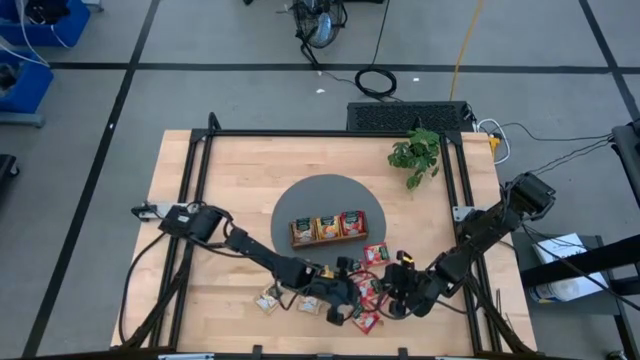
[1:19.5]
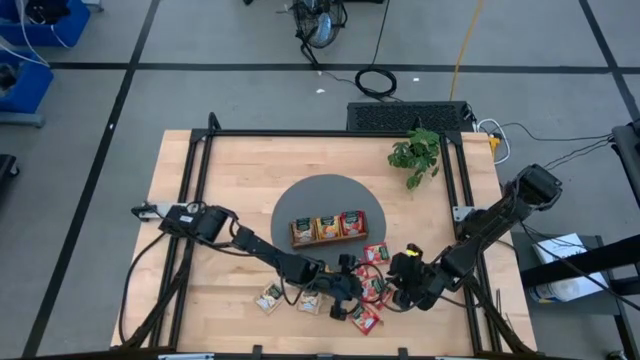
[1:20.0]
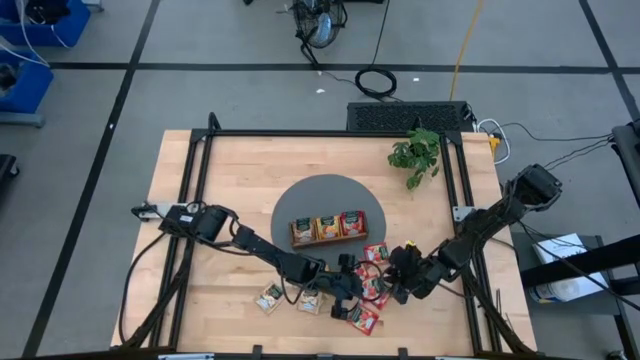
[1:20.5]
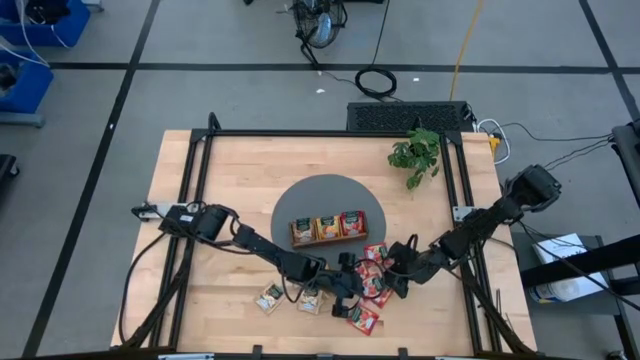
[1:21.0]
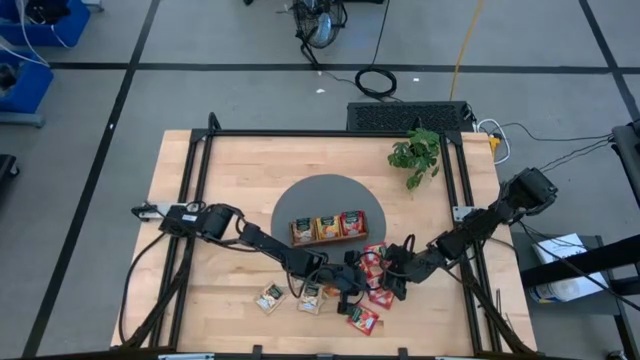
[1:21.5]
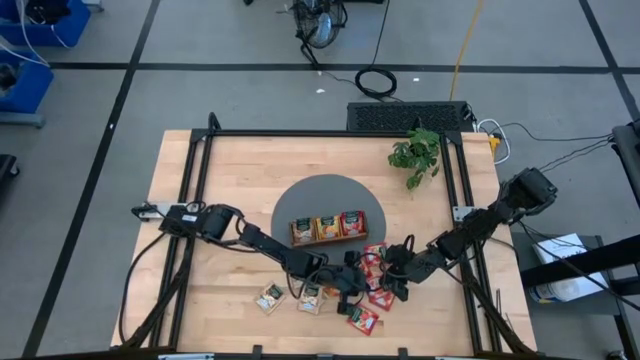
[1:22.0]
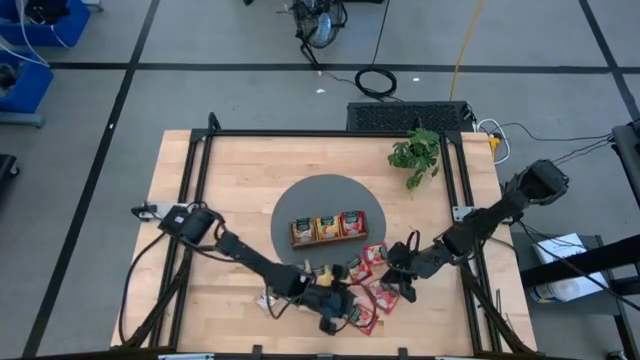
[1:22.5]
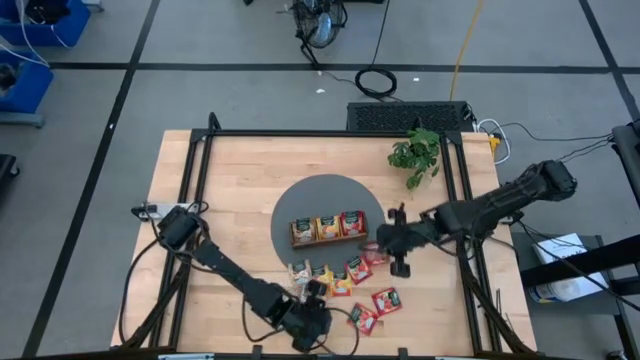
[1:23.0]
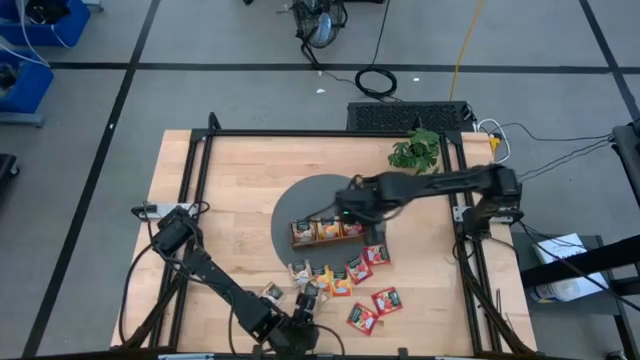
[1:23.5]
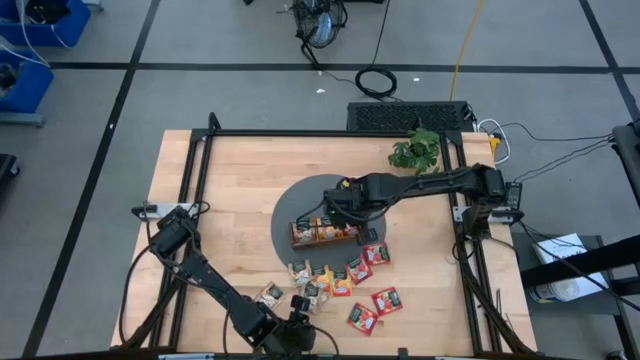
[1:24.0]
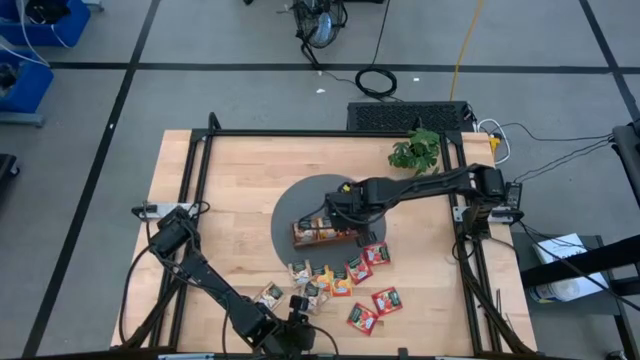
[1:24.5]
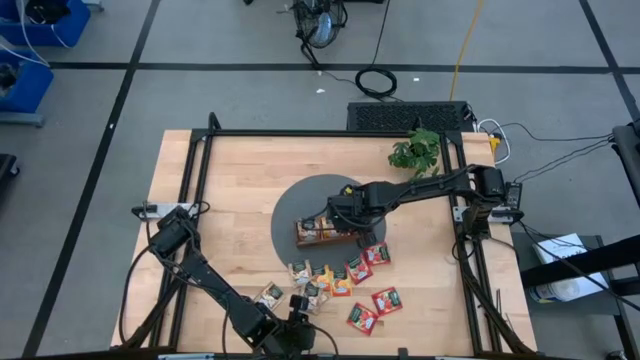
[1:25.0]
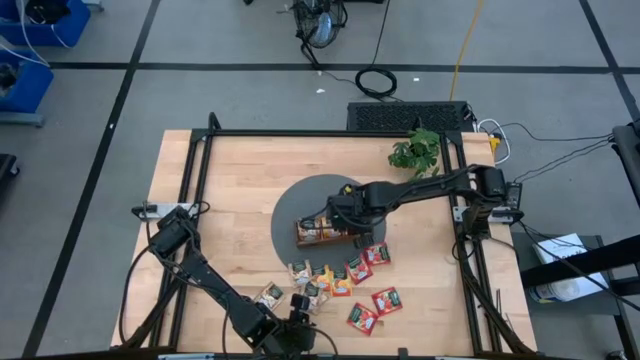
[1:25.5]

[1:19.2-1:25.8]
Task: Pick & Place Tea
Put the red tea bag into the right section of the wooden organizer

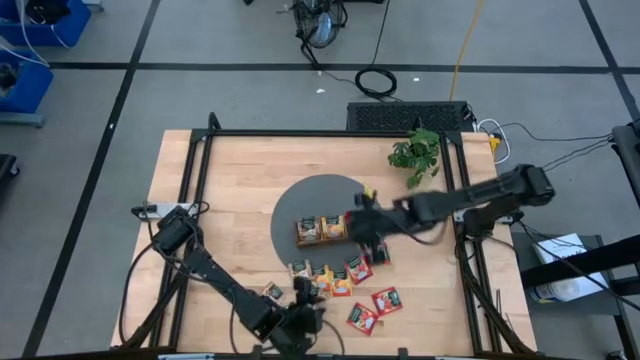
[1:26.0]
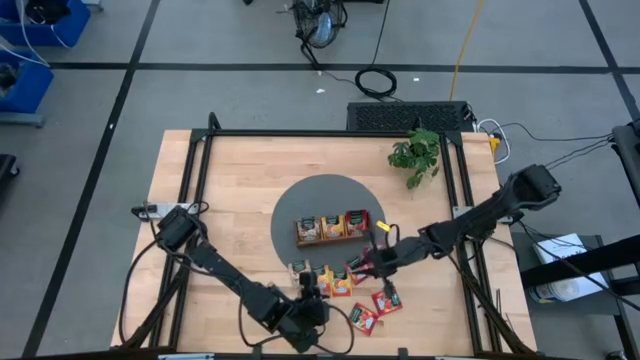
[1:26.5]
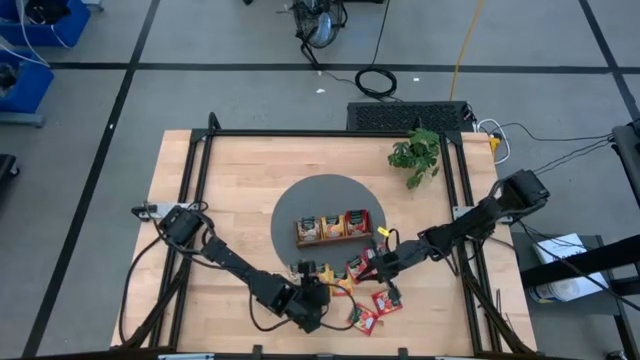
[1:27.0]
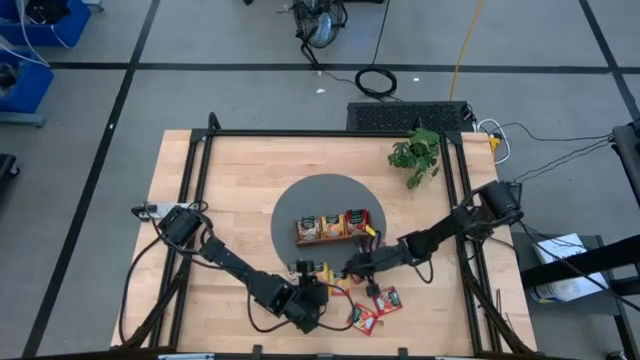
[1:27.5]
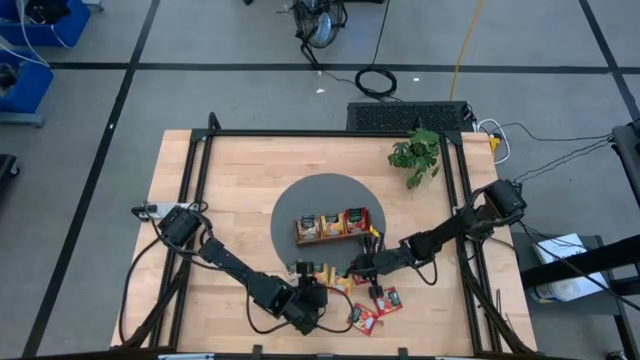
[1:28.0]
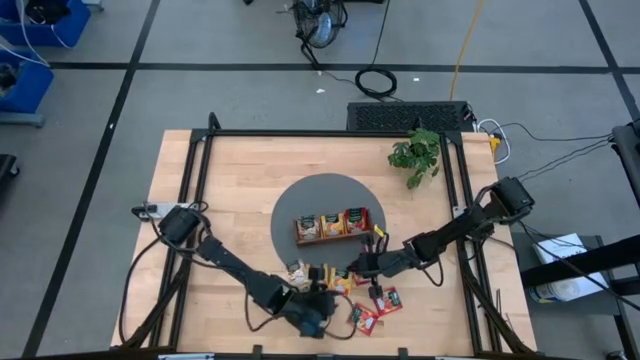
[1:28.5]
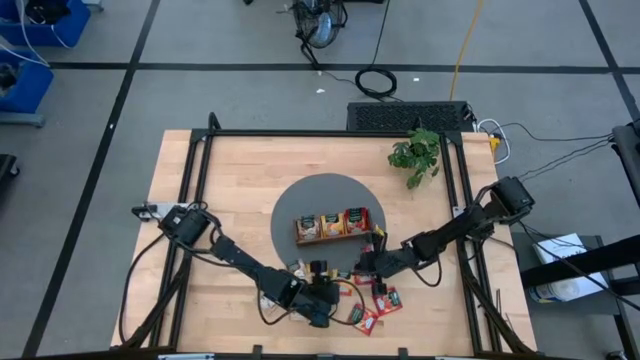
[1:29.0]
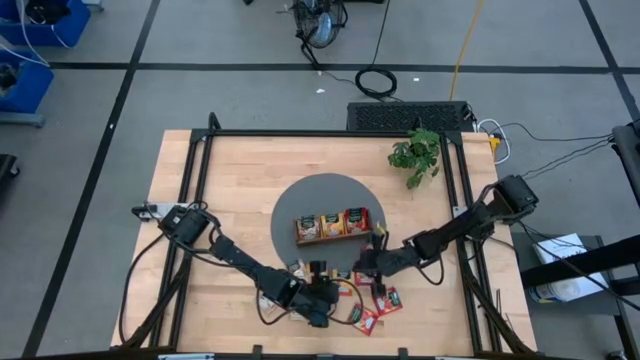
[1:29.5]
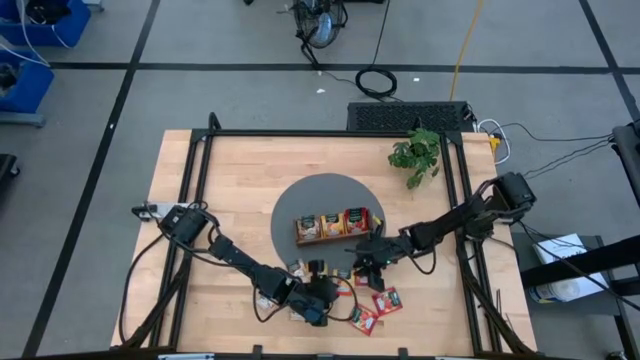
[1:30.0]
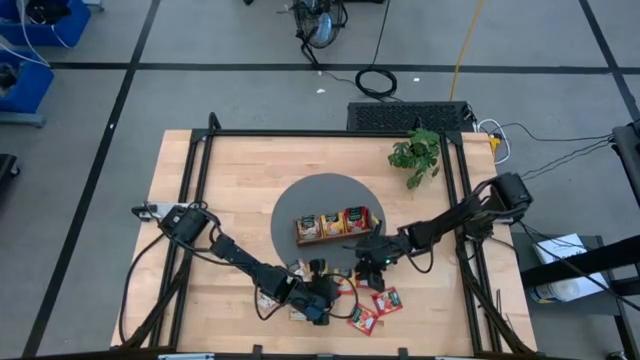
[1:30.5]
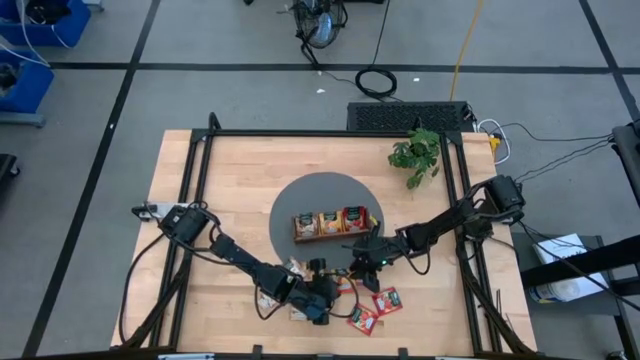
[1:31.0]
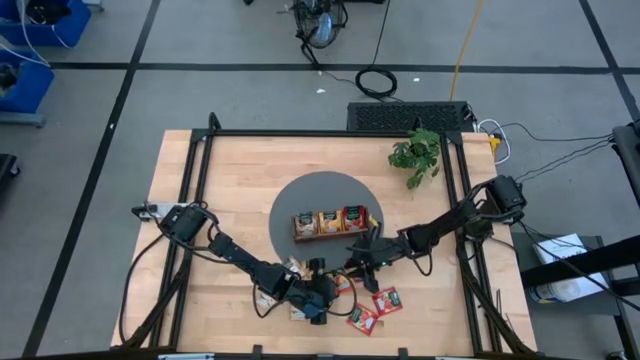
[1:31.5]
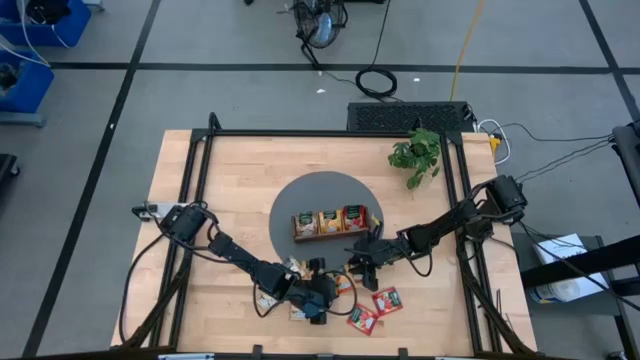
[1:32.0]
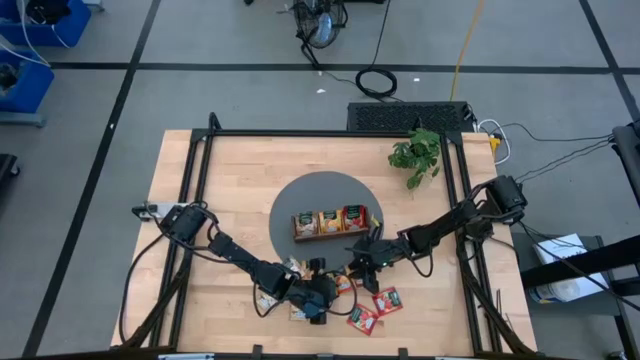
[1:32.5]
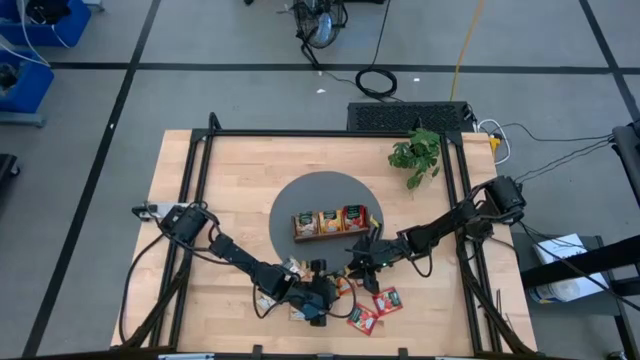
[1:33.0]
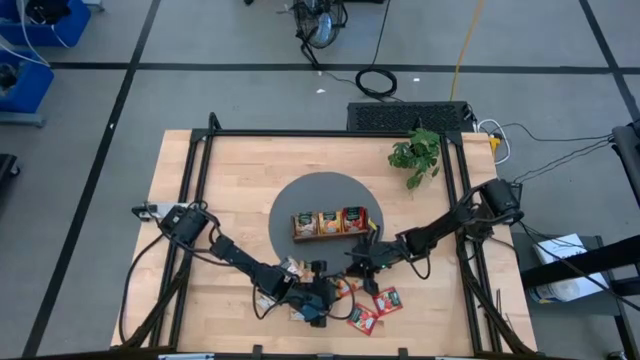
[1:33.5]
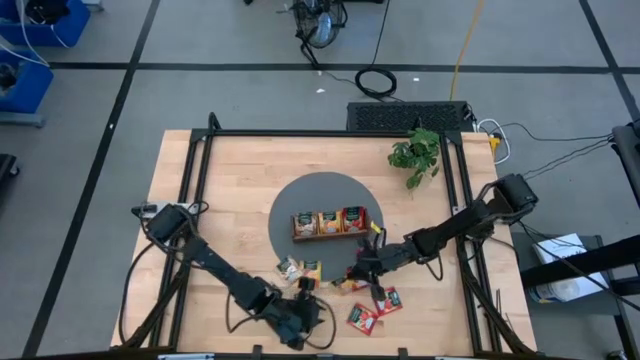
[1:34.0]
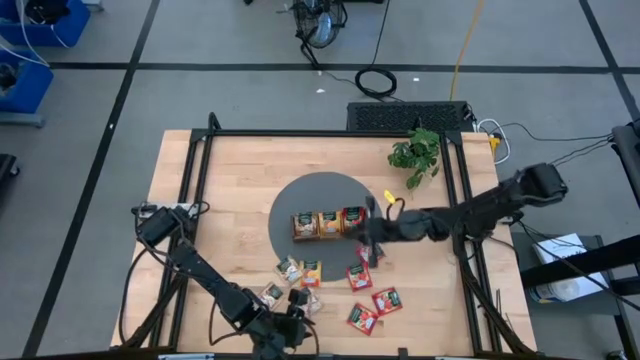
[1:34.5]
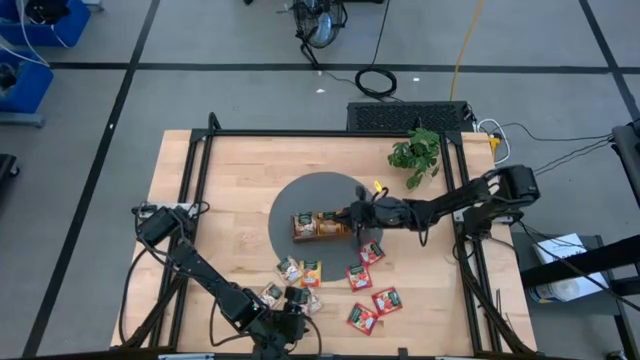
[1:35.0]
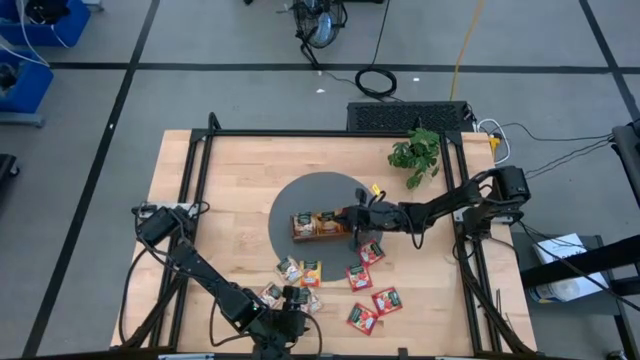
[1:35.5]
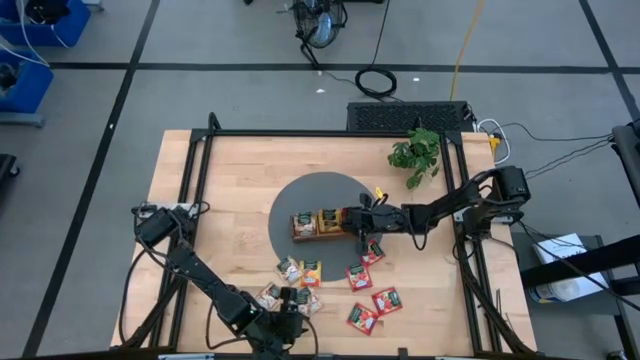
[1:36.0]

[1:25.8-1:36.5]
Put the yellow tea bag into the middle section of the wooden organizer

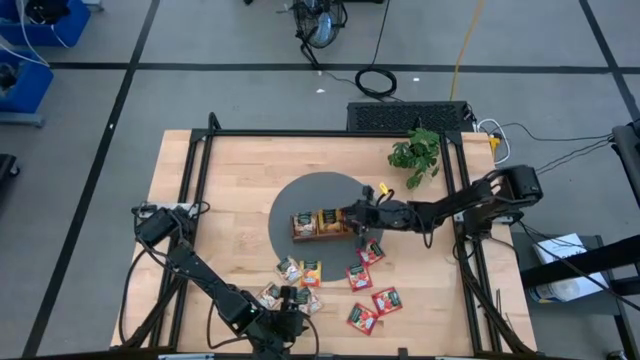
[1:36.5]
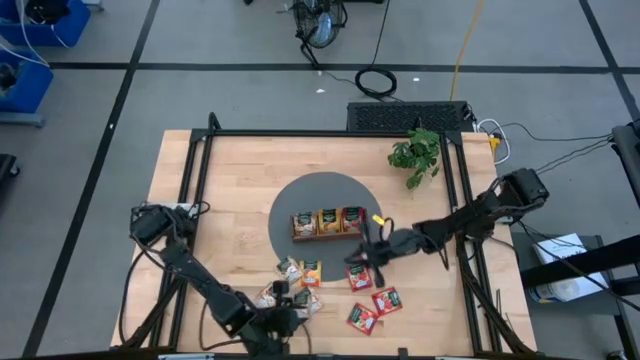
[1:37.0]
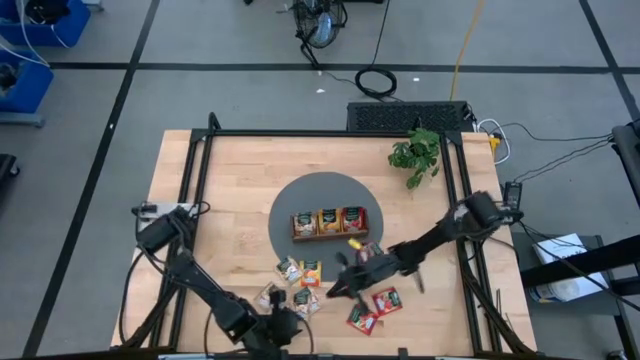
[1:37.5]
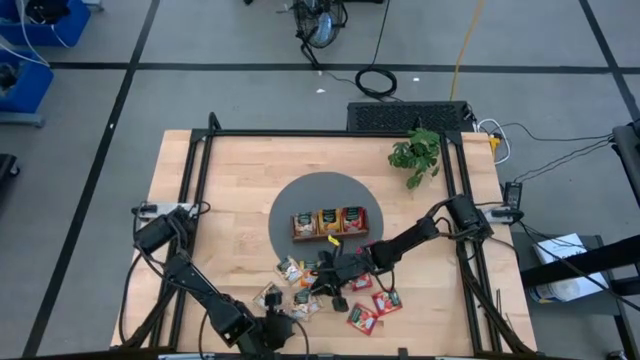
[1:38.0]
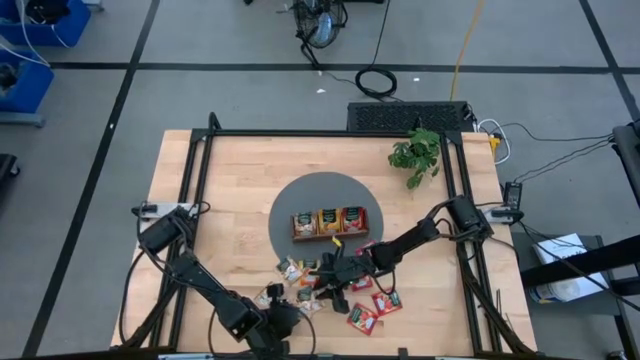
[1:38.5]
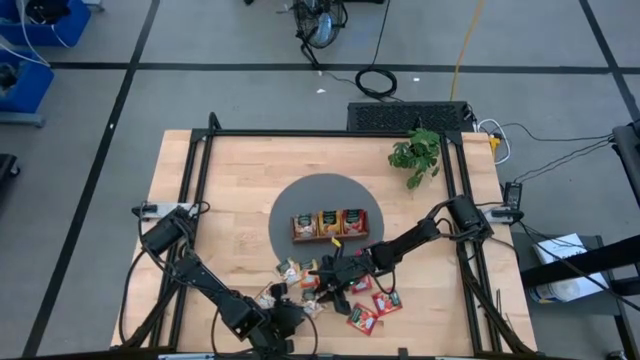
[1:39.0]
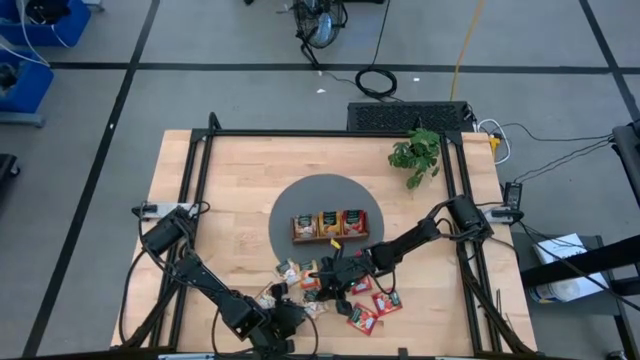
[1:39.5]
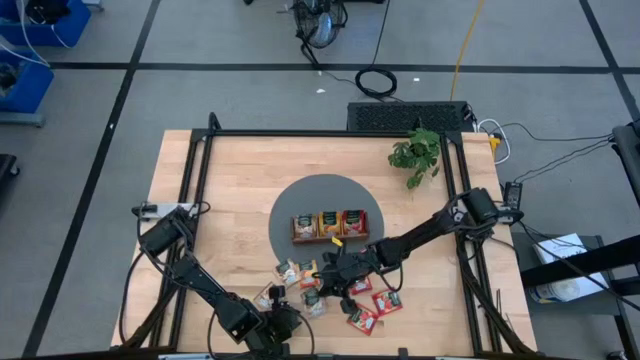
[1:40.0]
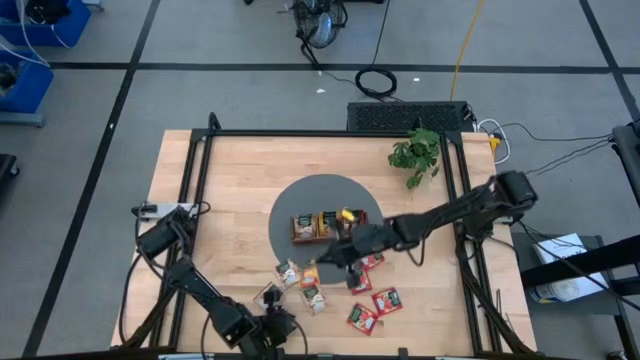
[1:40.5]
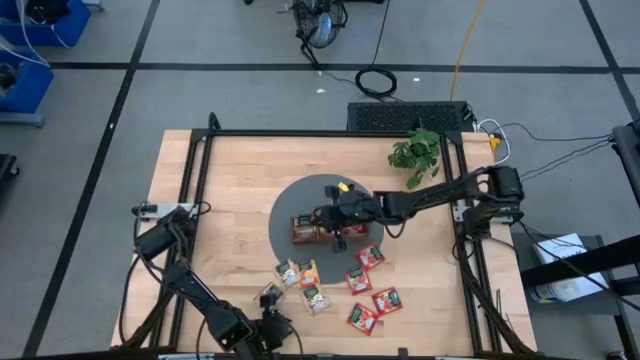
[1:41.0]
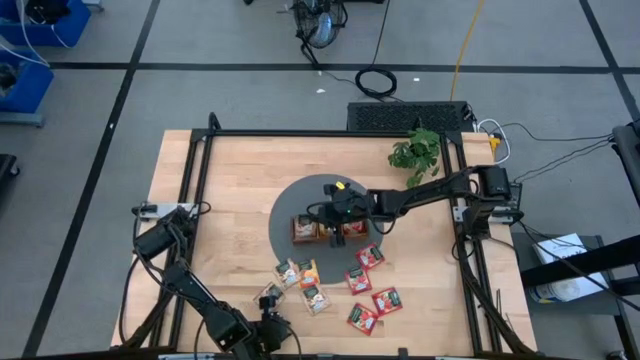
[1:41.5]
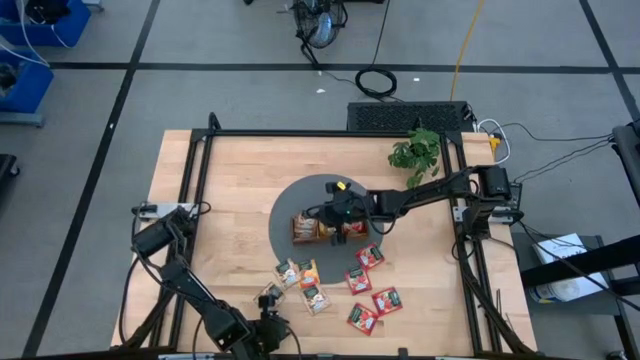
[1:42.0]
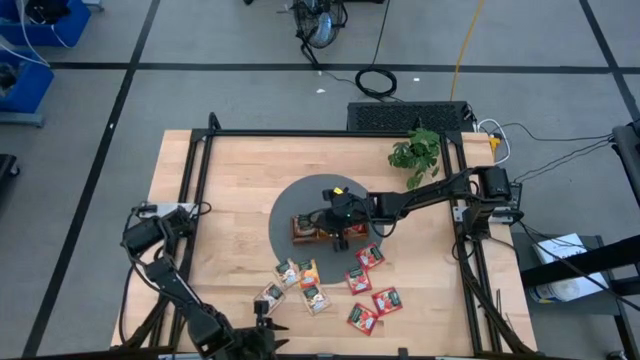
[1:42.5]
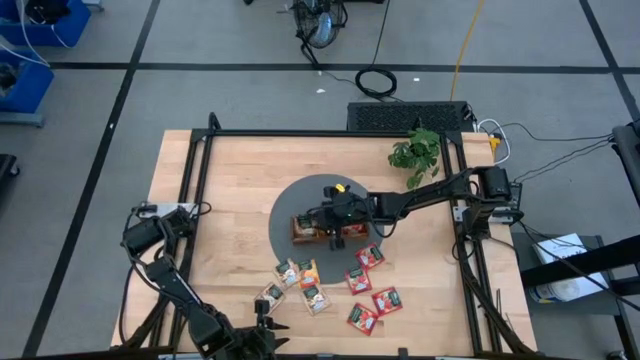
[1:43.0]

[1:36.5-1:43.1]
Put the brown tea bag into the left section of the wooden organizer
